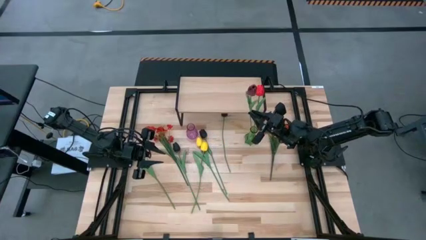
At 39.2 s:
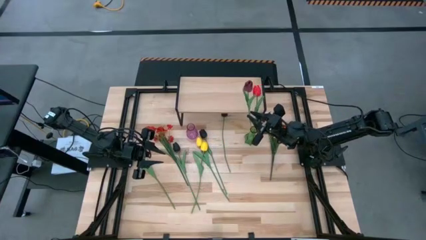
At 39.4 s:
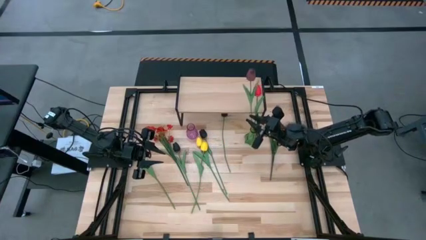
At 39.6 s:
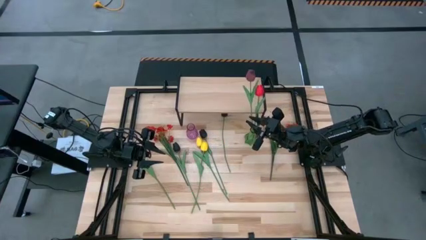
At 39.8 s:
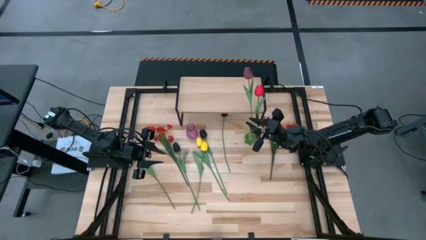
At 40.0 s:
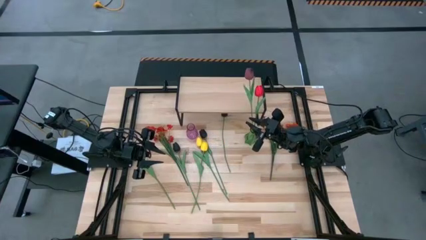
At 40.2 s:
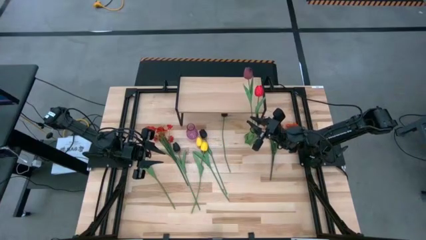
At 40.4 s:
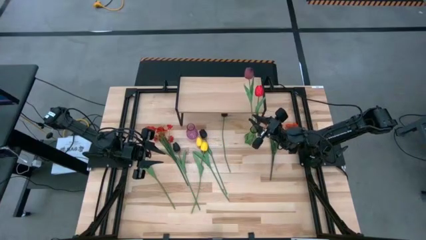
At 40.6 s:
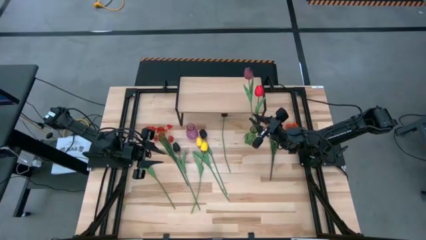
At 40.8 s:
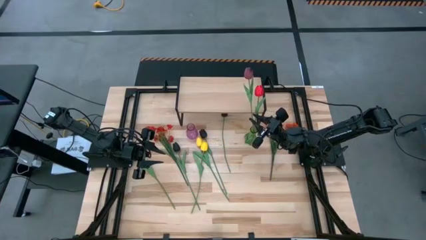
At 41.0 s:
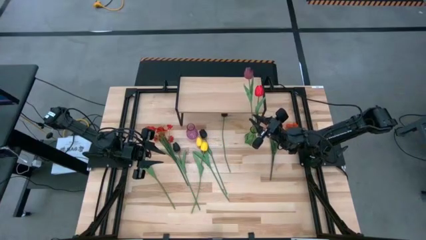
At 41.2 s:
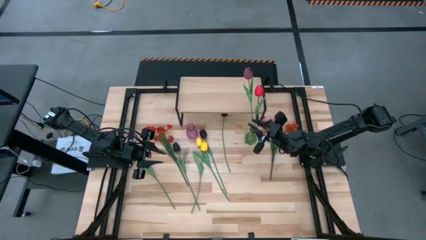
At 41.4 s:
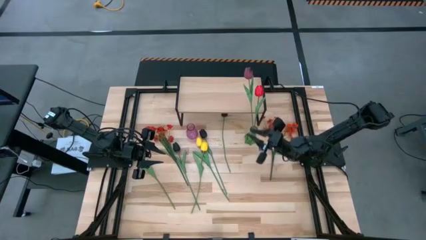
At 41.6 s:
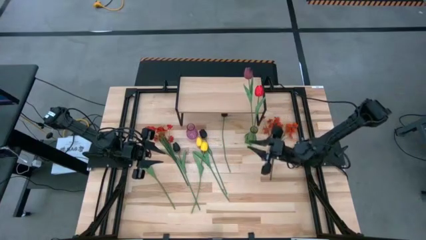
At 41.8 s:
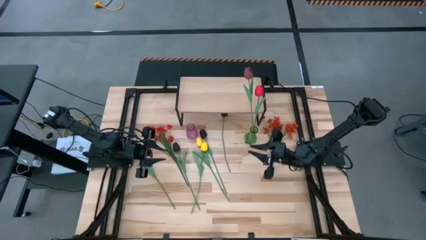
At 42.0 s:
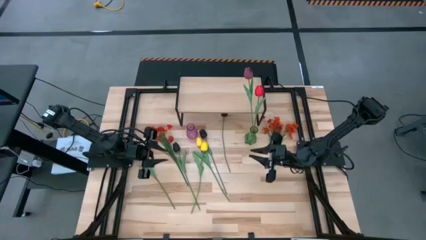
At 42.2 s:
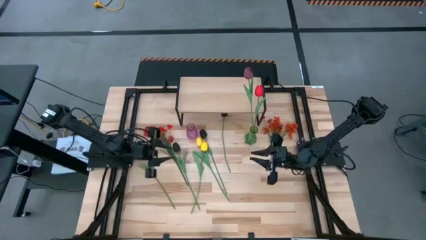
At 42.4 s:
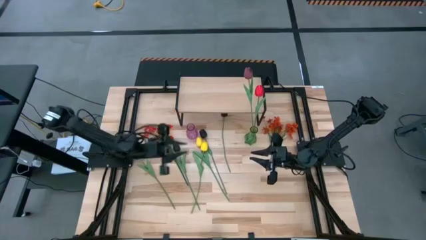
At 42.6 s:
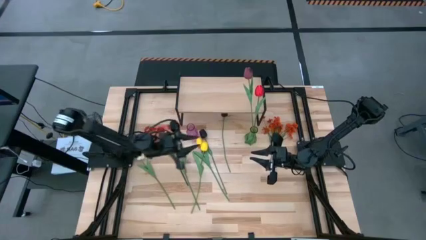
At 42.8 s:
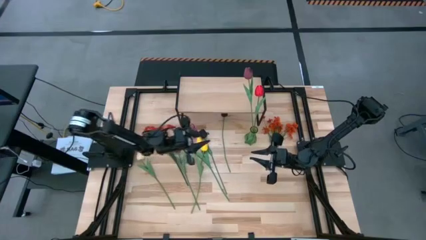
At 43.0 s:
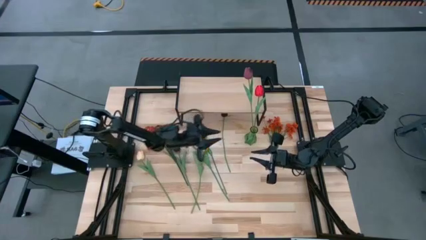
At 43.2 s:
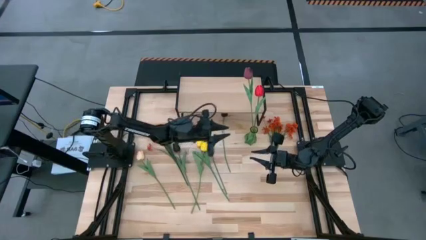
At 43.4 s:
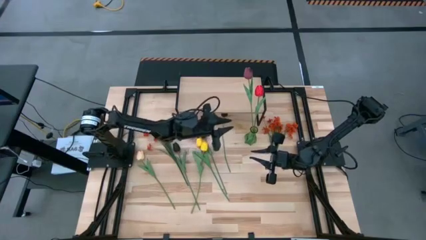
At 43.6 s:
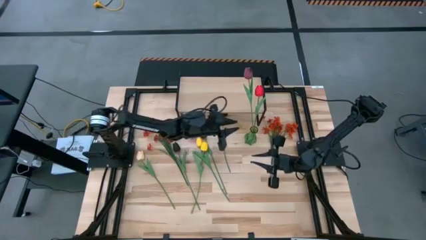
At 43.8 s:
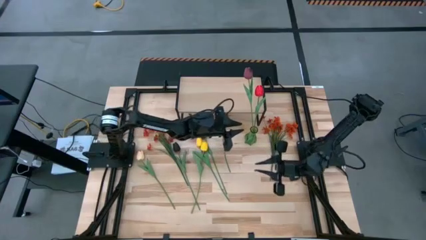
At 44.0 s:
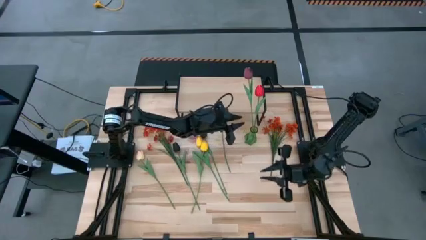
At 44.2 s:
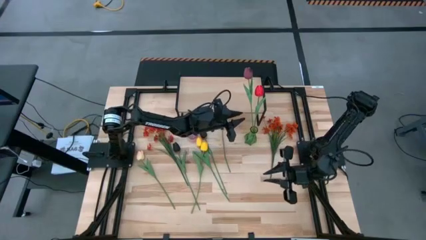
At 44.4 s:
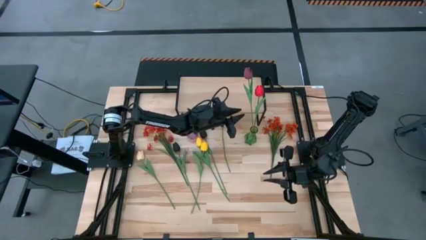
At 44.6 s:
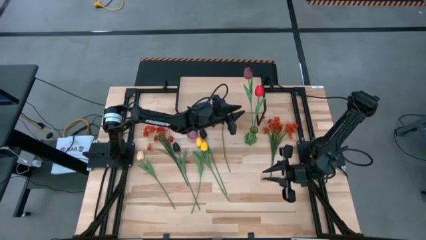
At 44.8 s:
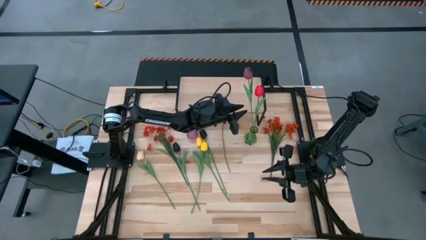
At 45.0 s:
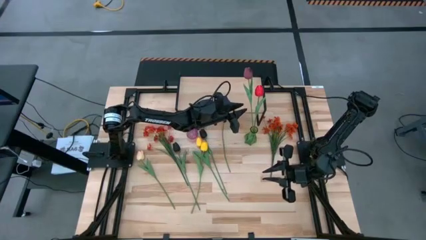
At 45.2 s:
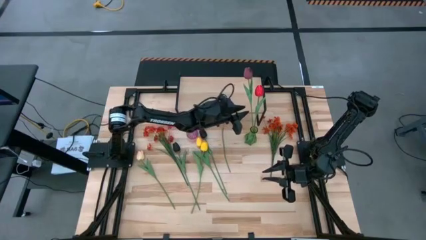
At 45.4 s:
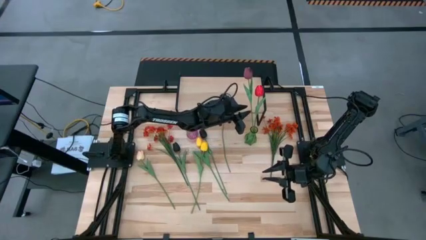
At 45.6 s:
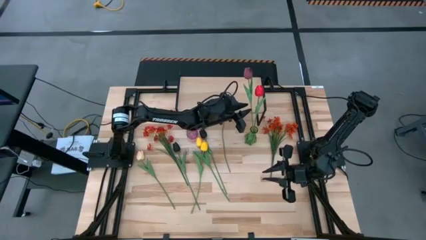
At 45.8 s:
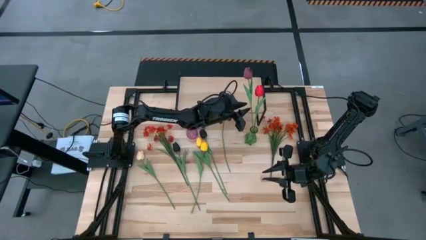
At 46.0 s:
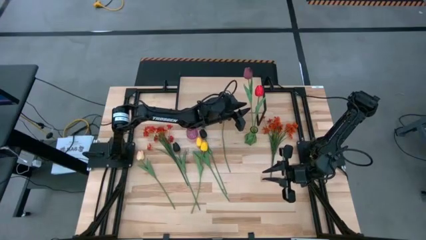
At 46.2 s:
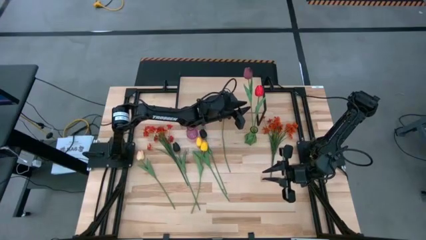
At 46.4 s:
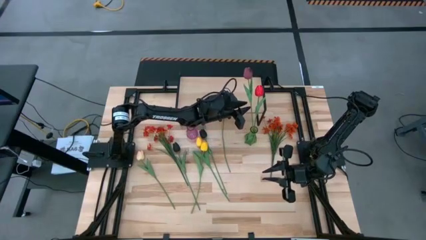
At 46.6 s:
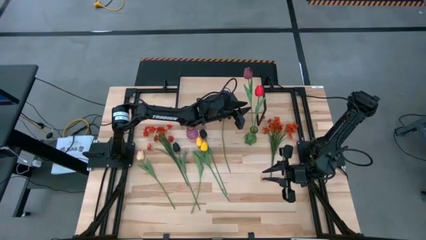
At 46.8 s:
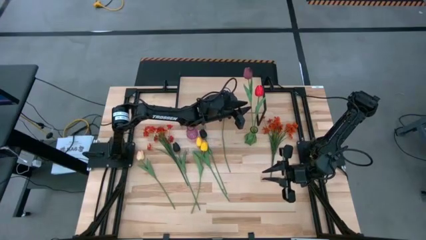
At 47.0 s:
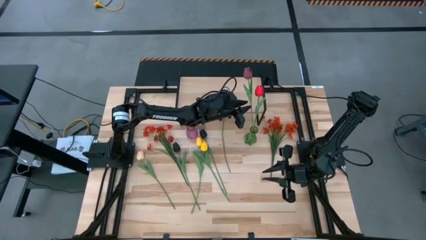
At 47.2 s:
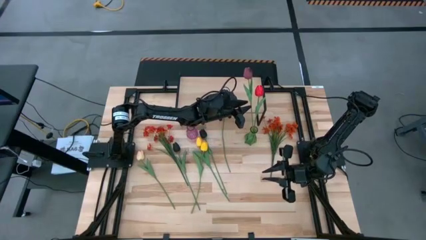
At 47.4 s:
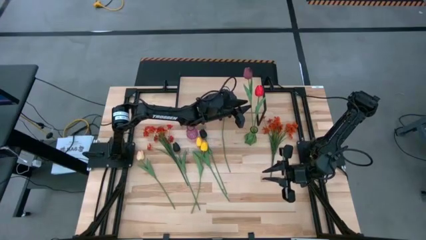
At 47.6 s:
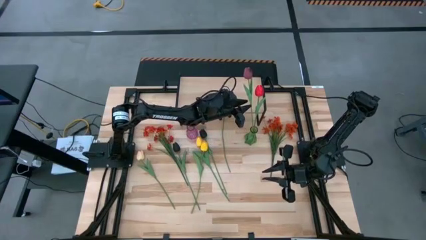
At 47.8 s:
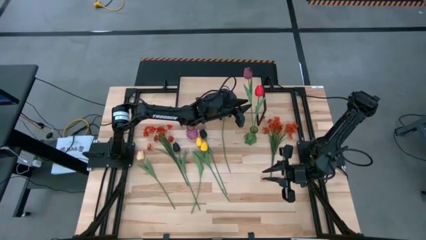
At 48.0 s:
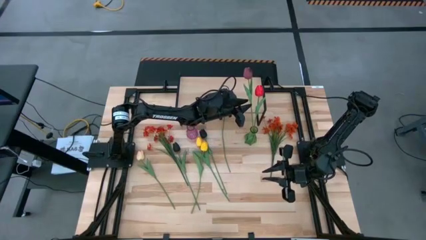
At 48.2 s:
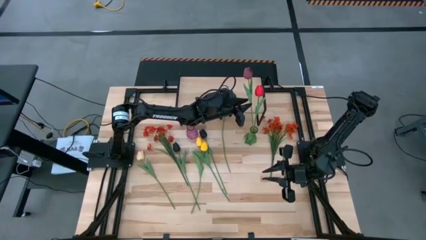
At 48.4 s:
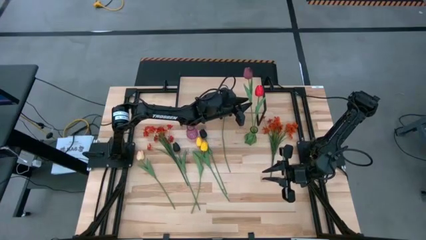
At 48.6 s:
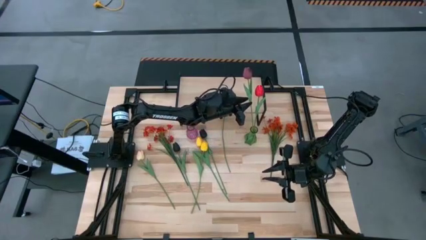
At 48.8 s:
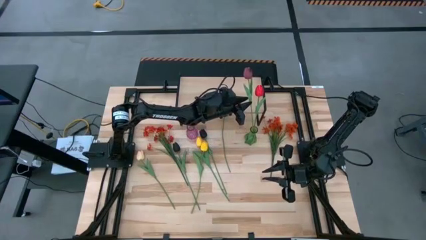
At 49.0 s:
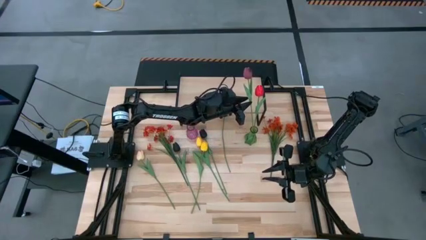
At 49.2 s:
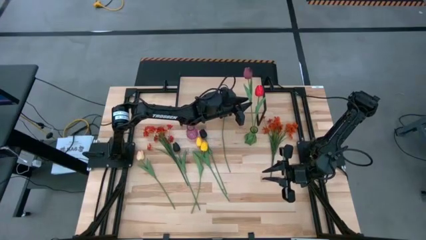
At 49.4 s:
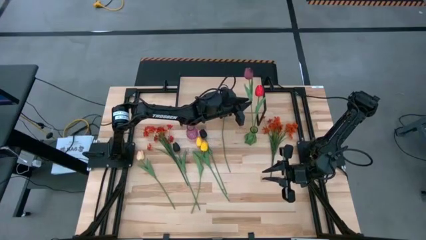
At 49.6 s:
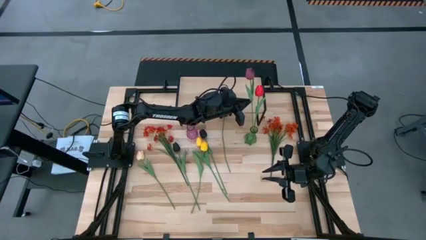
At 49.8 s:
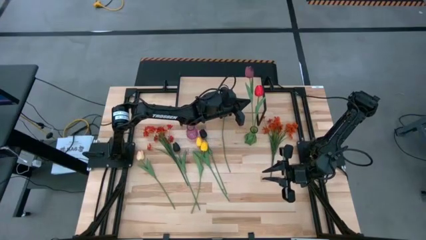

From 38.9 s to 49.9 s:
Task: Pick and place flowers into a vace then onto a shelf
Put the dark red tulip into the green vase

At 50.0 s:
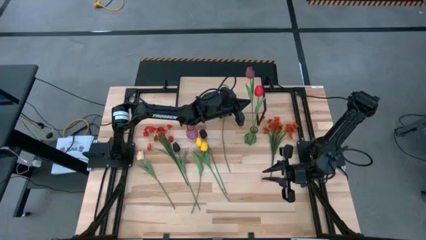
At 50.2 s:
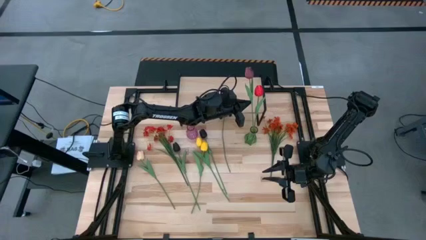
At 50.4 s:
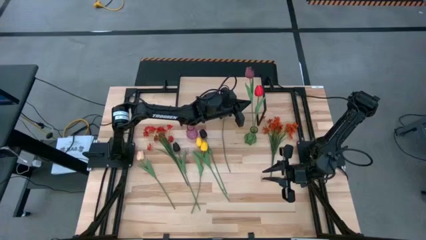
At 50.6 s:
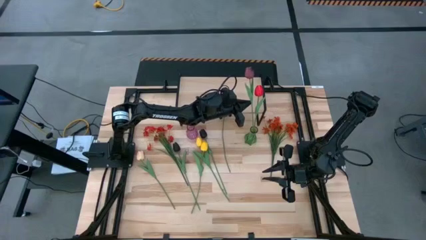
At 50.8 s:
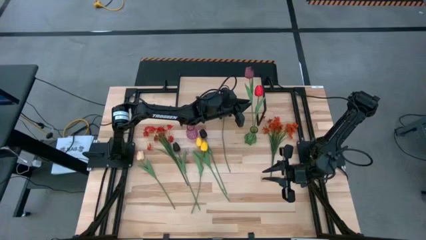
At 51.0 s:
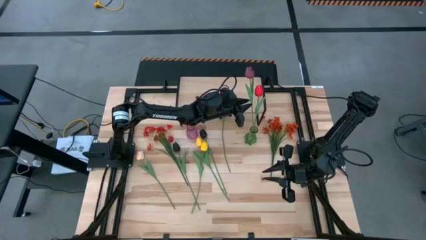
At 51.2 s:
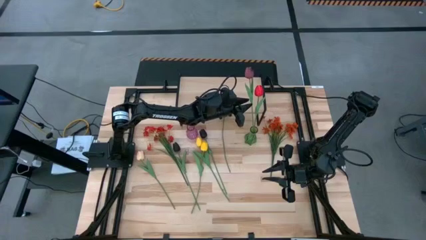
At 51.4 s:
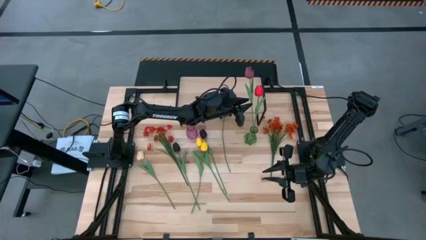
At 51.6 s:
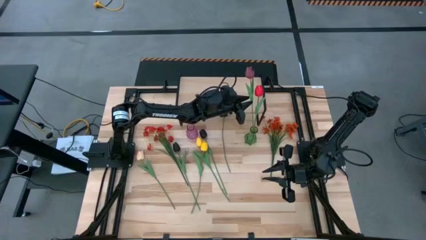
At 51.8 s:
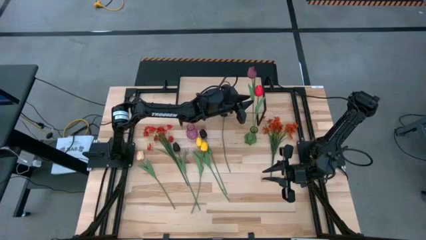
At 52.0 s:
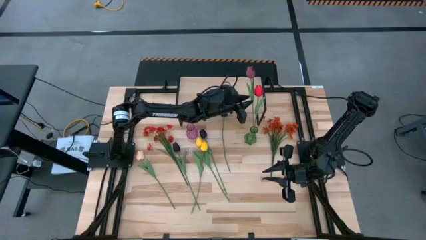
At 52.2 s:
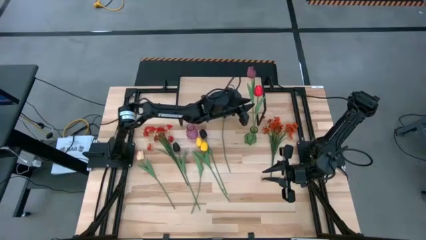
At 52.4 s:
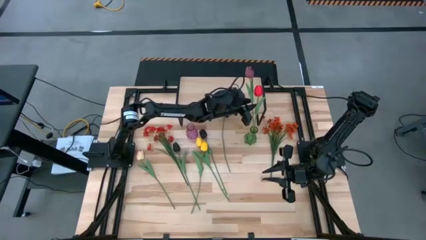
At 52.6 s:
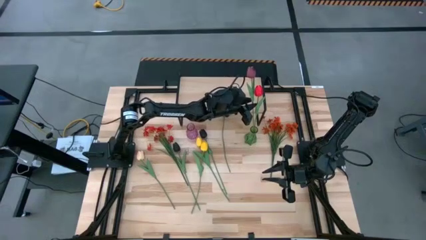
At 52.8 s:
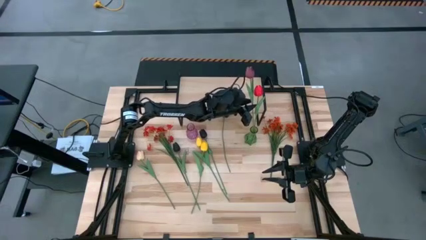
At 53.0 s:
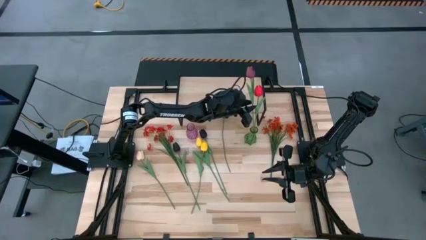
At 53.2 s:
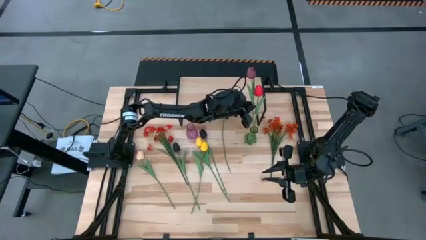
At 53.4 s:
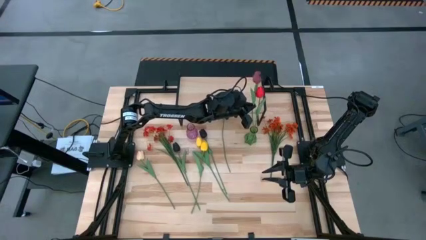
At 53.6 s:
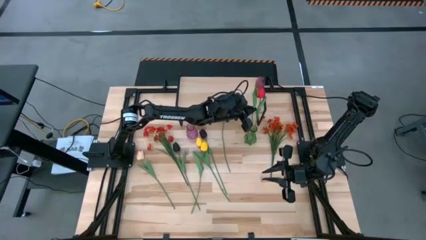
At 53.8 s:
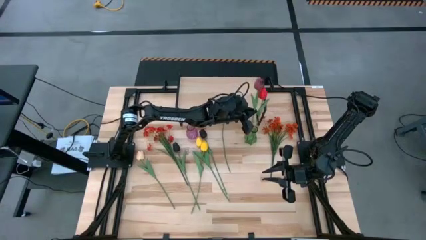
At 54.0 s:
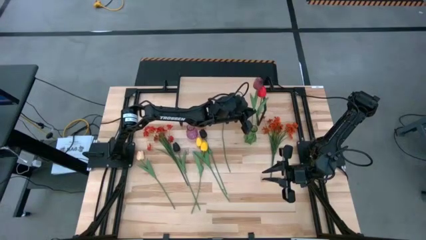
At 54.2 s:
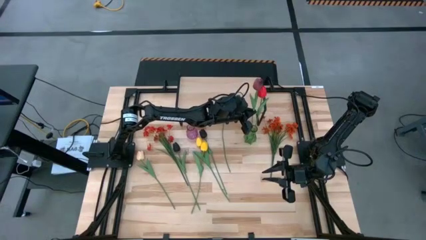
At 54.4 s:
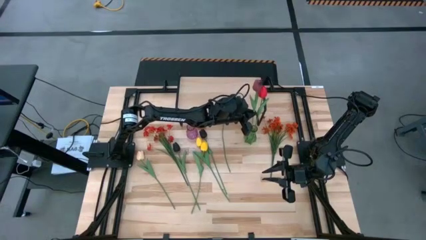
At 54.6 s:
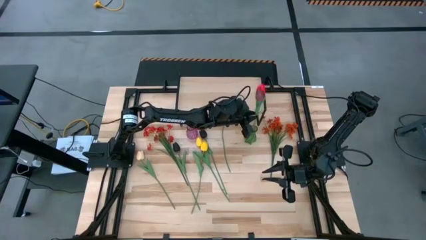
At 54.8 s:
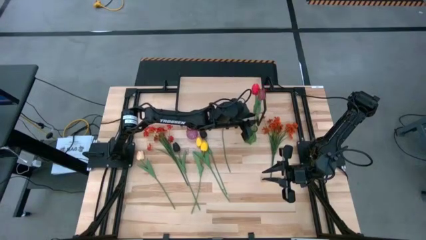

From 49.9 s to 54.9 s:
Put the dark red tulip into the green vase
